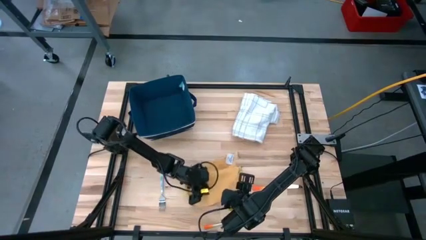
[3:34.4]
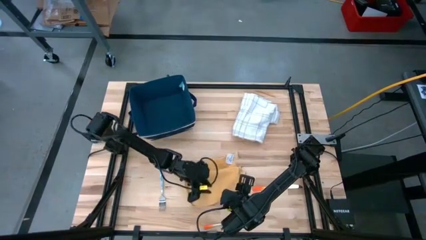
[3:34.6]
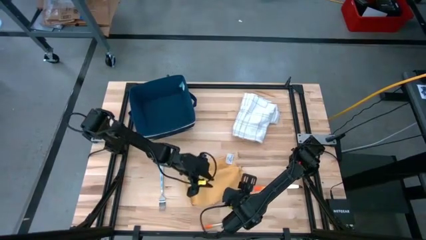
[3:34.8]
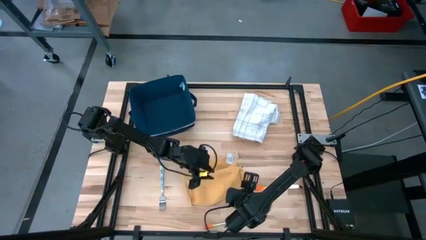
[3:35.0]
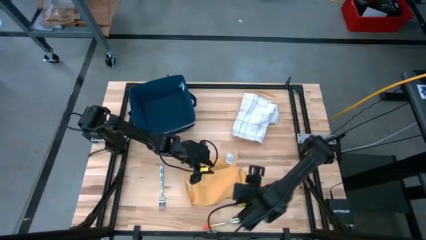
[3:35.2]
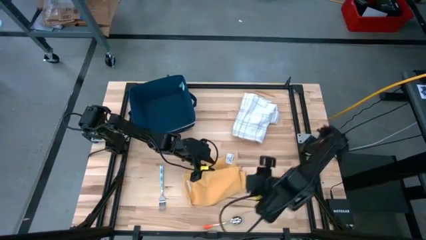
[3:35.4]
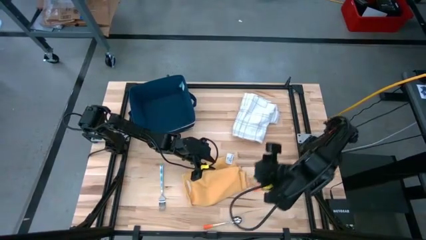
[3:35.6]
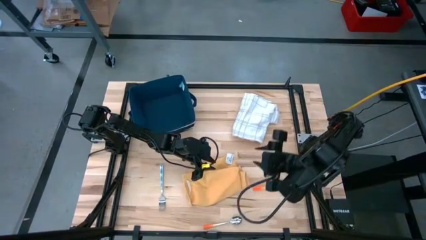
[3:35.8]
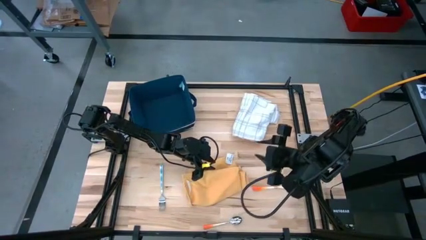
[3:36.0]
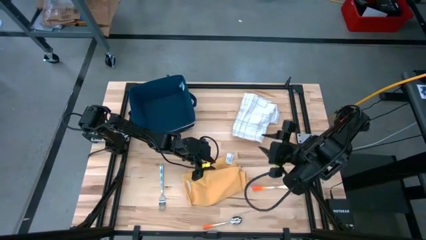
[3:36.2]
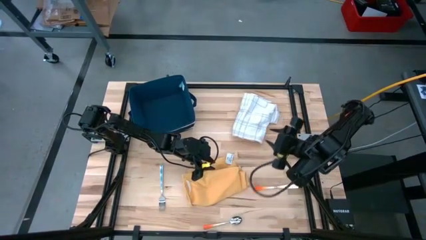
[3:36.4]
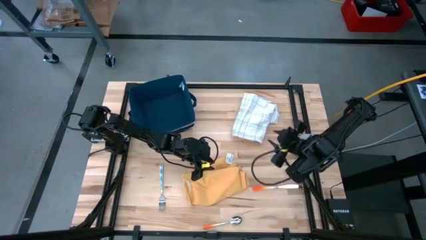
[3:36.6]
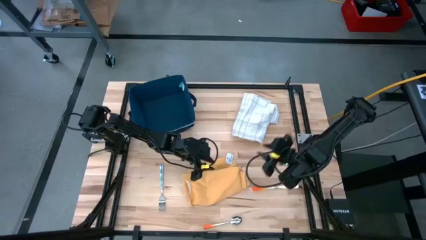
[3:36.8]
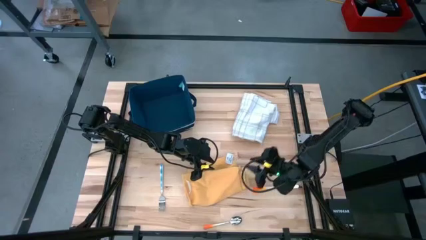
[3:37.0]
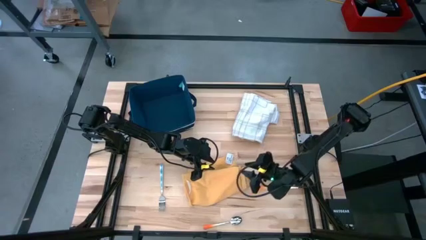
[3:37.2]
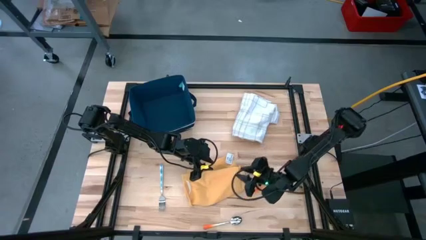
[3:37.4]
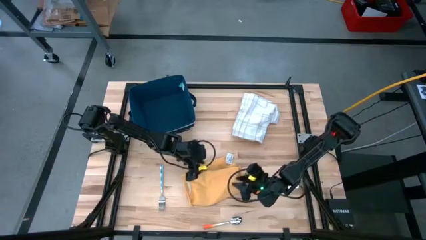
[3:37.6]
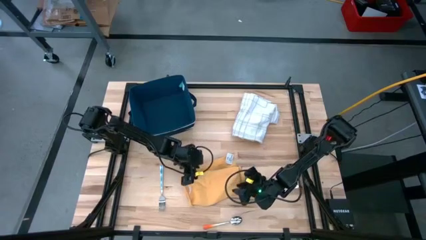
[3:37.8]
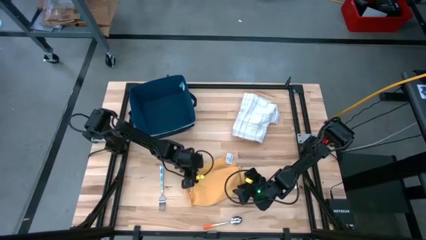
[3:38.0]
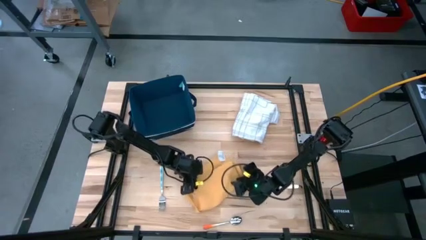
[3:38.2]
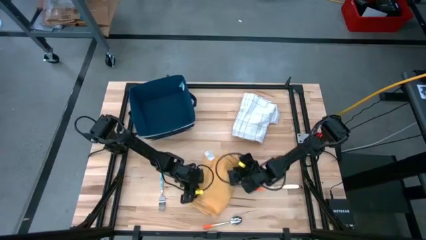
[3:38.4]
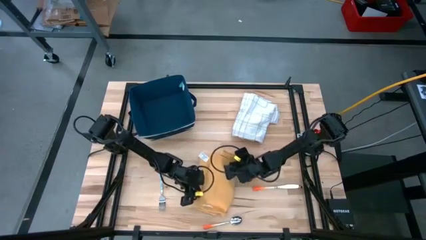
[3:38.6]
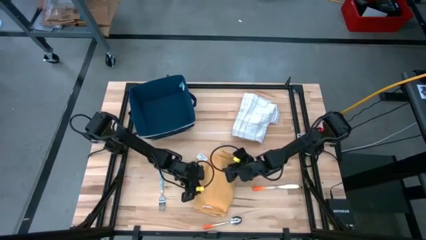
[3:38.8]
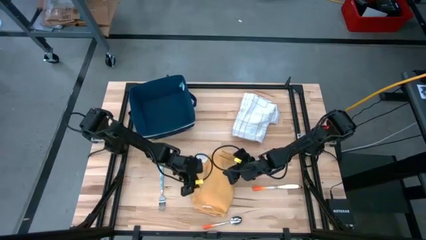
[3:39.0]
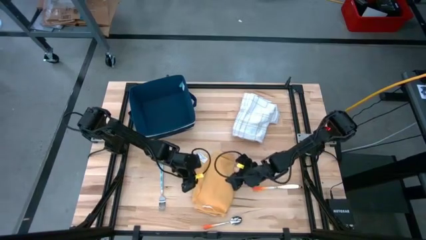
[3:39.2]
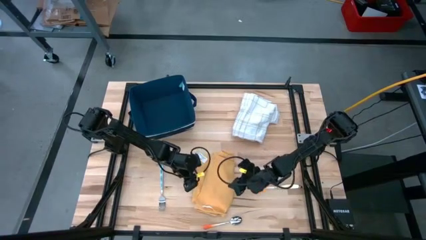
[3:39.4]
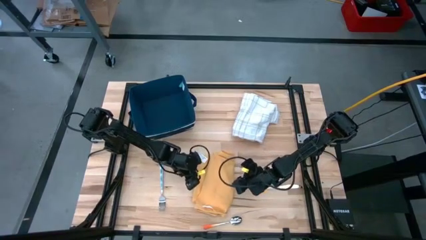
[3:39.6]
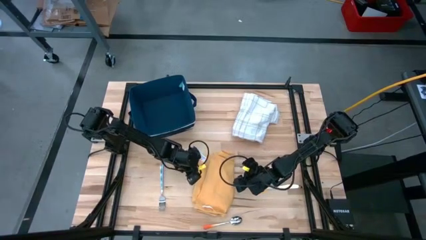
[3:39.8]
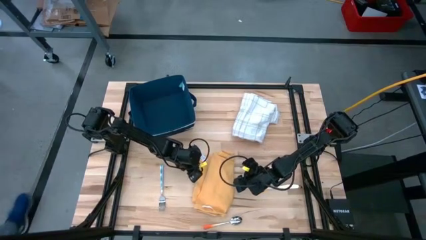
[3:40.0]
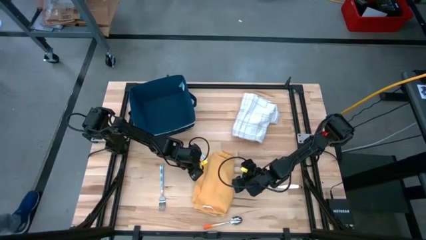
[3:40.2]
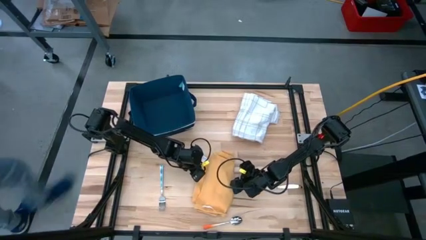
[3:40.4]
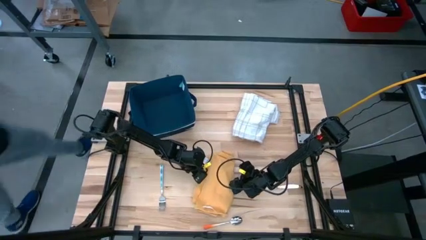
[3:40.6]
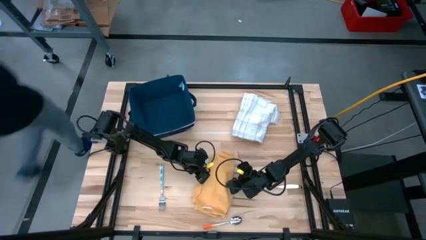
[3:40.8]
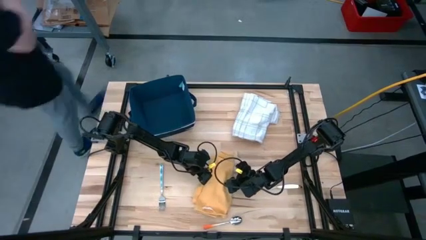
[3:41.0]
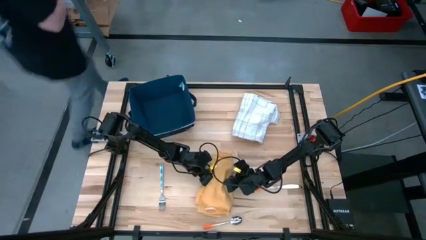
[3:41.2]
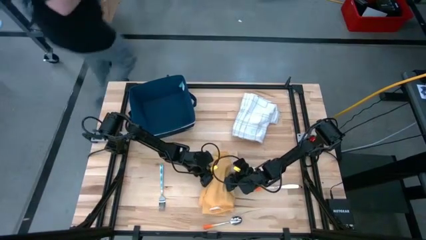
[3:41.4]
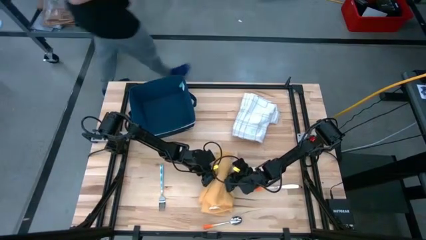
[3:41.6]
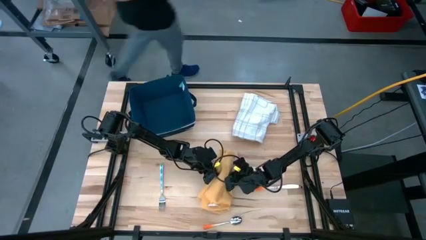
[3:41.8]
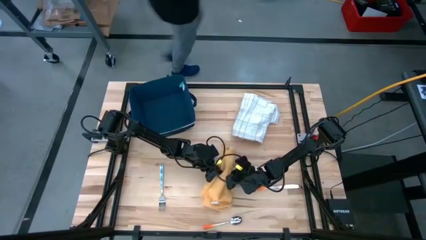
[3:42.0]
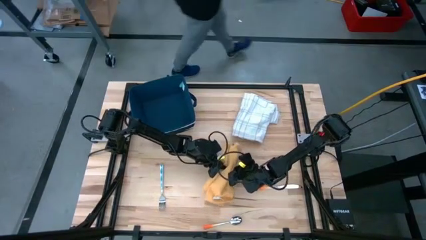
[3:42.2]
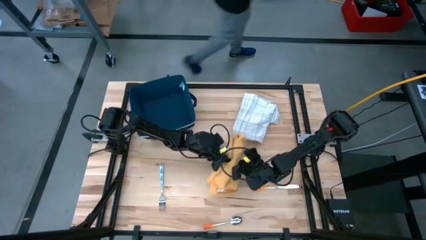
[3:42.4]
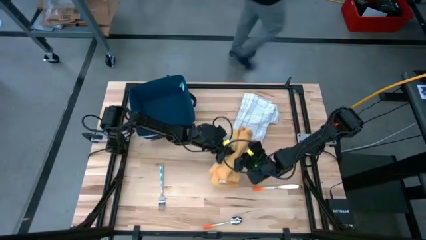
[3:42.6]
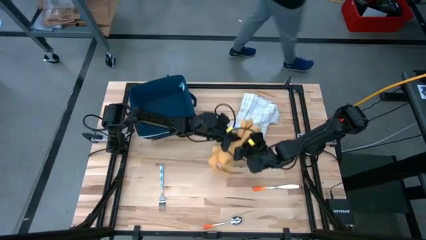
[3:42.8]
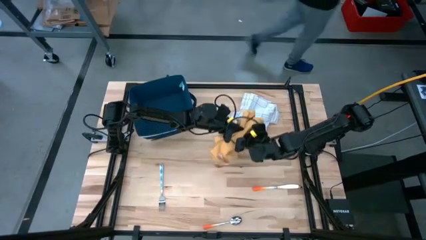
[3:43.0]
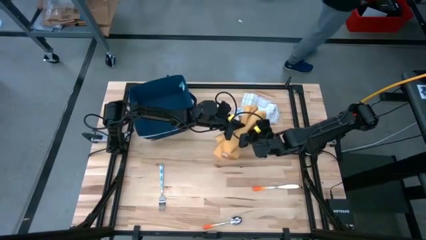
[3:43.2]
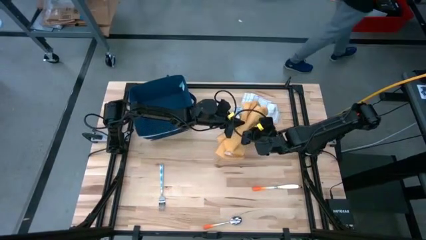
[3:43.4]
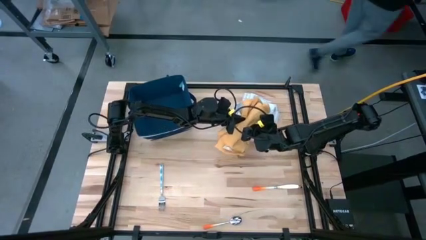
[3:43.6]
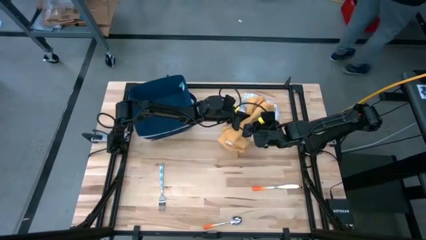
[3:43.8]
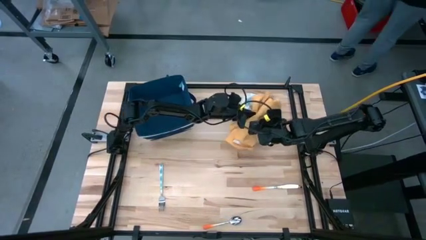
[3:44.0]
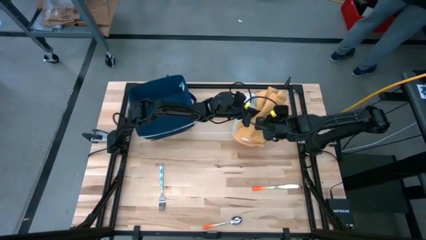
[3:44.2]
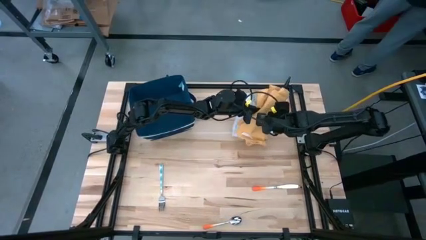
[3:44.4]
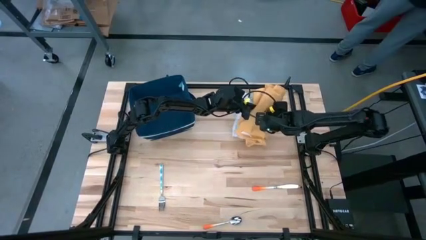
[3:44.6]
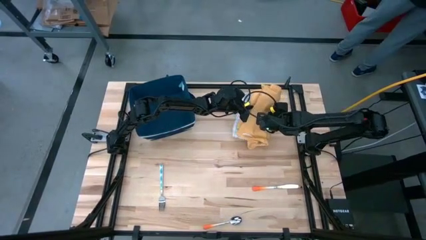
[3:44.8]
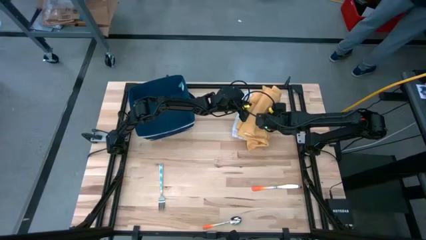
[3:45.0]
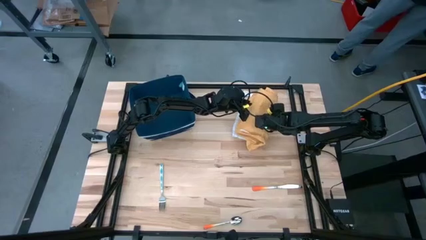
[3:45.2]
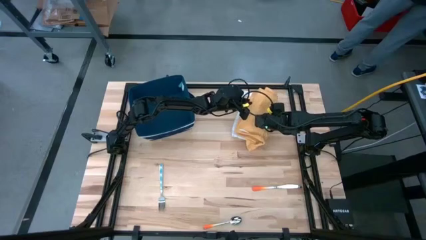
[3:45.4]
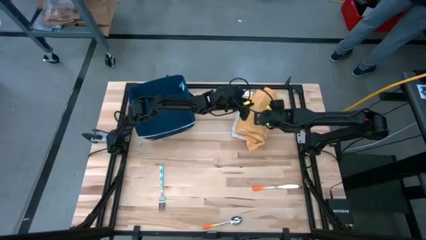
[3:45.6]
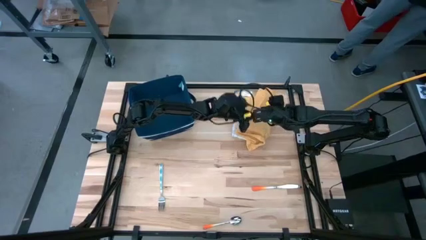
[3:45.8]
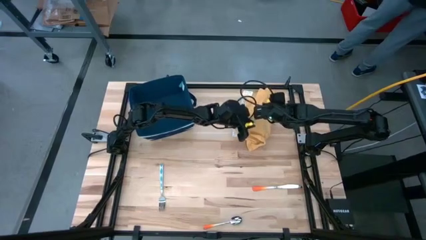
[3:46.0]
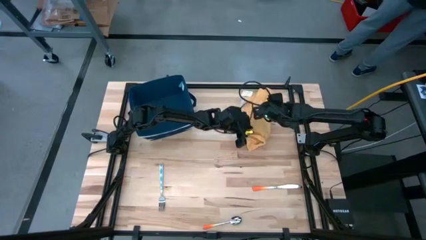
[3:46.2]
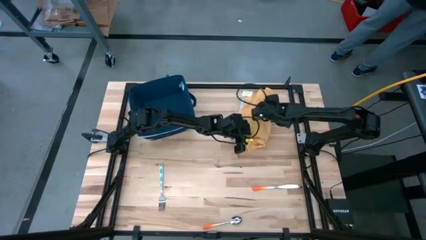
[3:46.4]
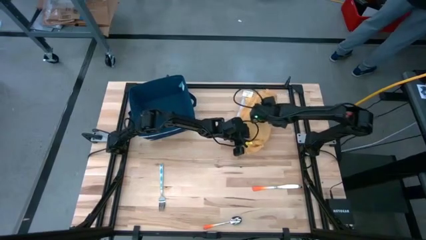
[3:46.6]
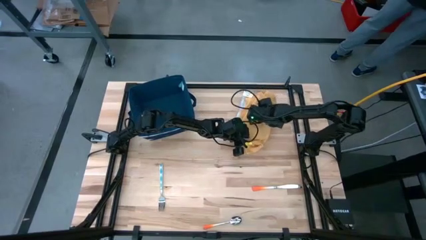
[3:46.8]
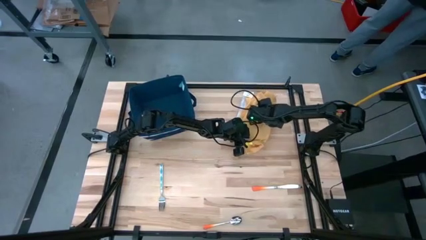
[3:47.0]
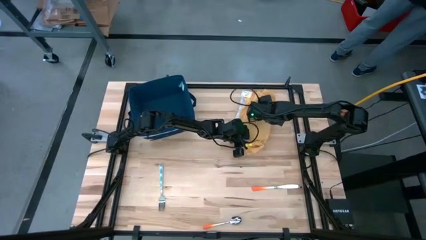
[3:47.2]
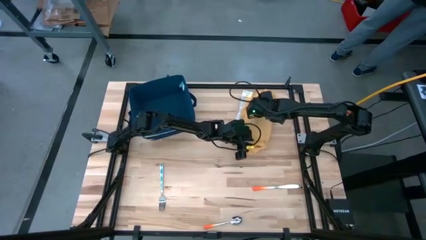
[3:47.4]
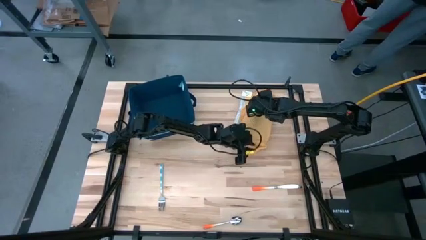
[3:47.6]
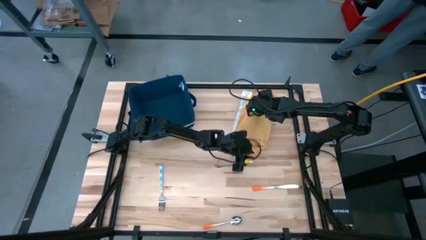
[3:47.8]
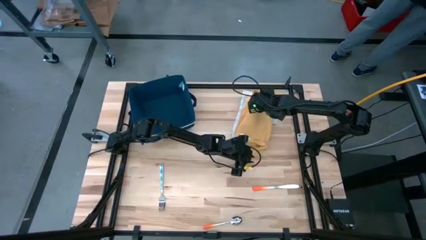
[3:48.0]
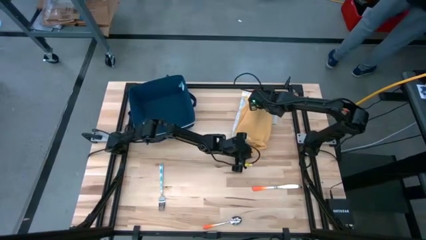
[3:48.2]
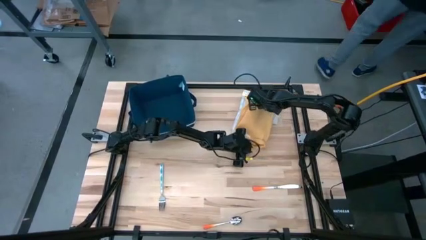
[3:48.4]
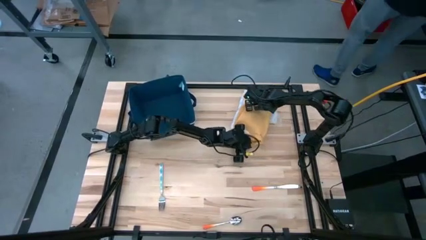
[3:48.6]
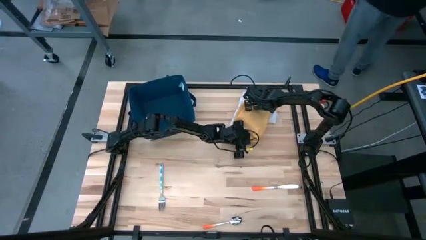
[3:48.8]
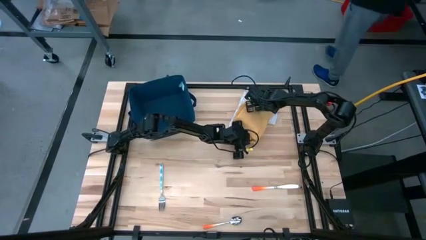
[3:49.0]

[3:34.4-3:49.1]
Task: Fold towel
Stack the yellow towel on the white patterned towel
